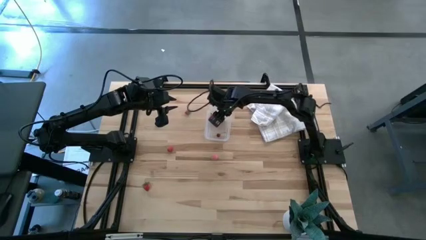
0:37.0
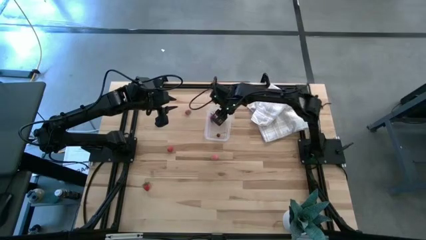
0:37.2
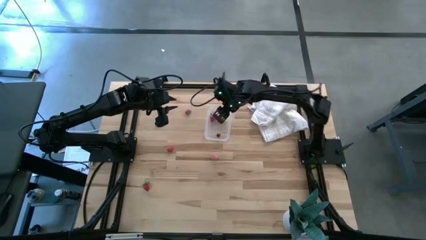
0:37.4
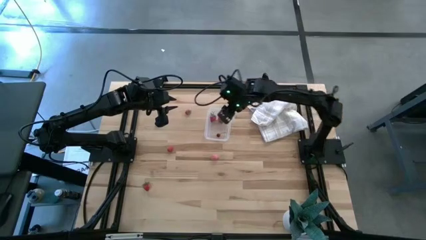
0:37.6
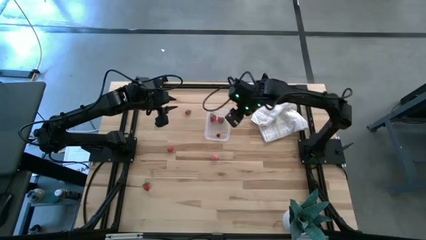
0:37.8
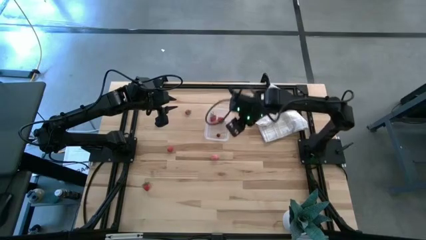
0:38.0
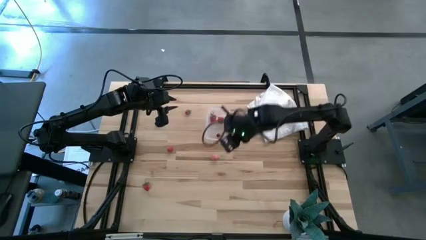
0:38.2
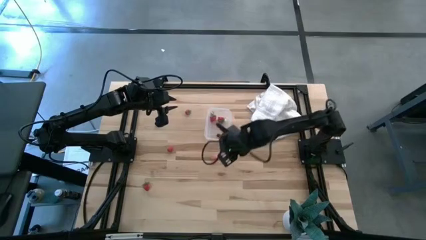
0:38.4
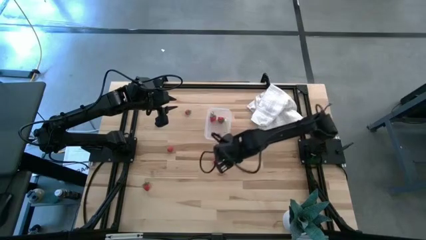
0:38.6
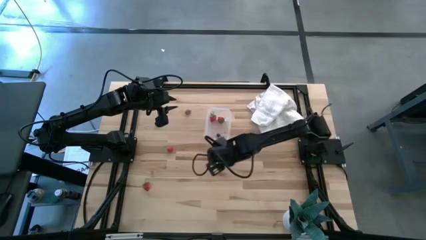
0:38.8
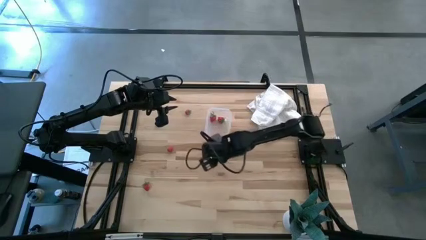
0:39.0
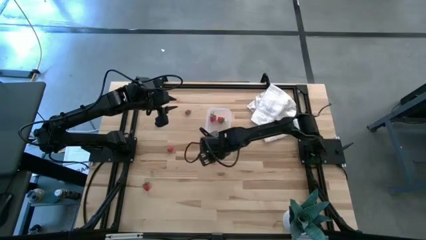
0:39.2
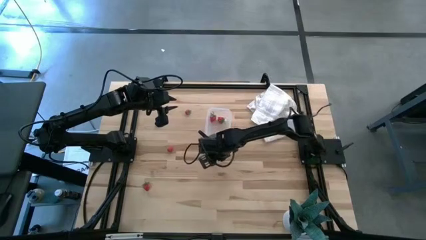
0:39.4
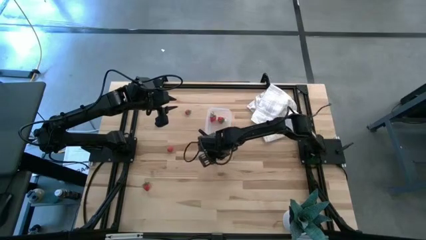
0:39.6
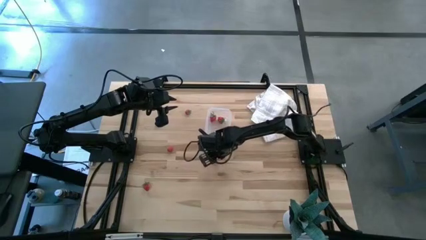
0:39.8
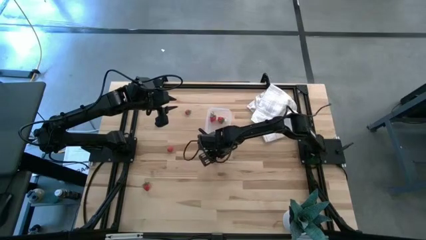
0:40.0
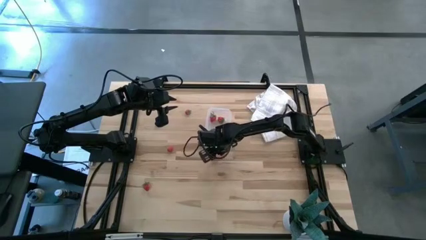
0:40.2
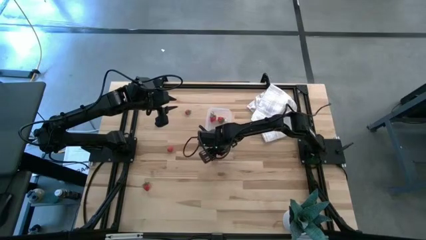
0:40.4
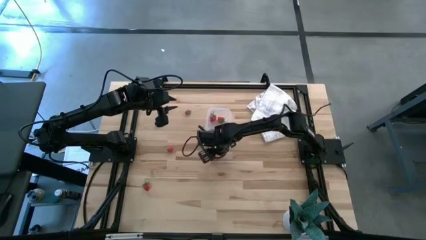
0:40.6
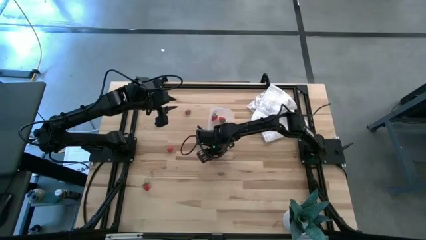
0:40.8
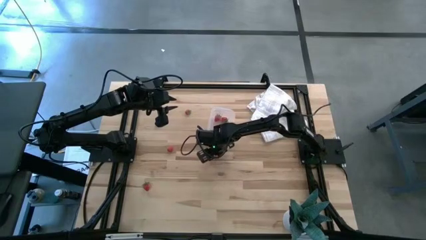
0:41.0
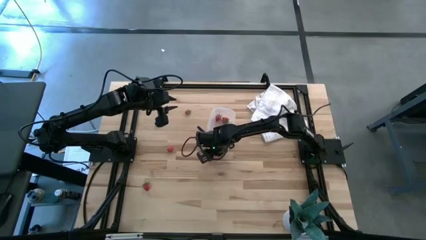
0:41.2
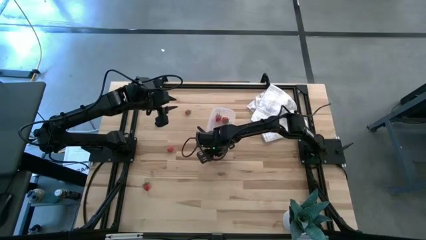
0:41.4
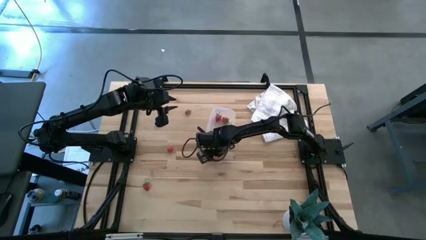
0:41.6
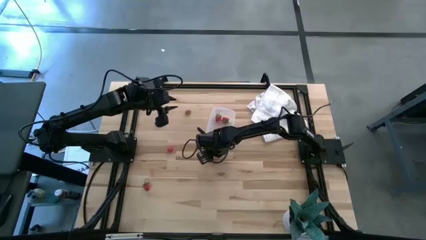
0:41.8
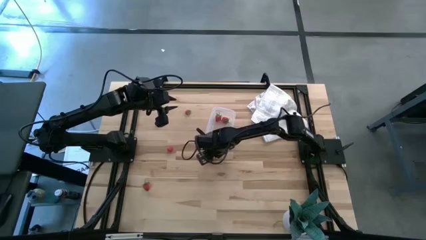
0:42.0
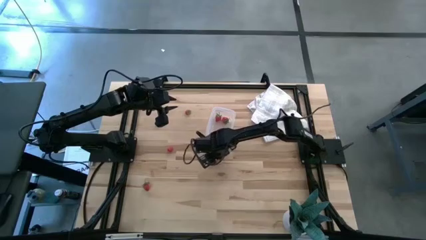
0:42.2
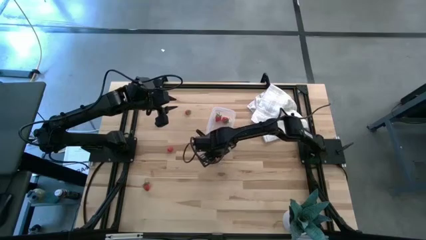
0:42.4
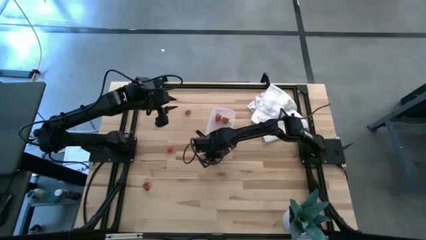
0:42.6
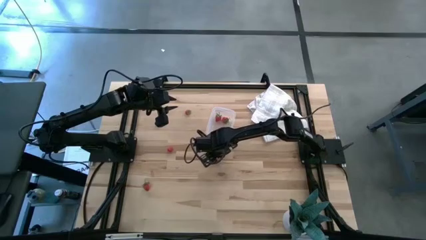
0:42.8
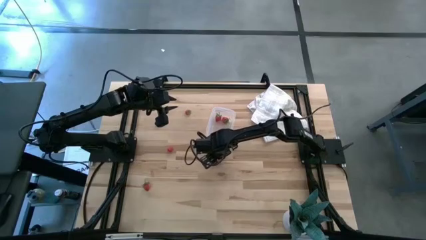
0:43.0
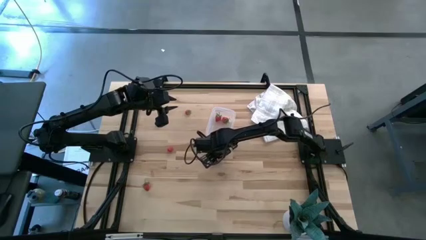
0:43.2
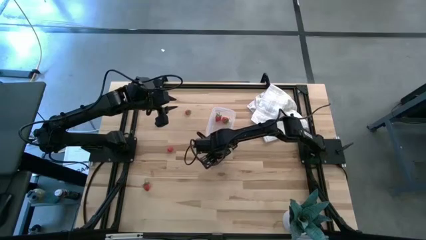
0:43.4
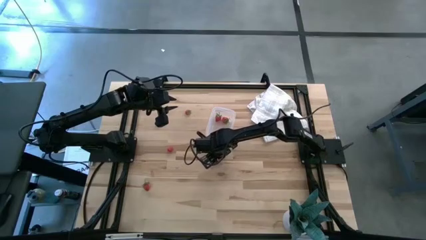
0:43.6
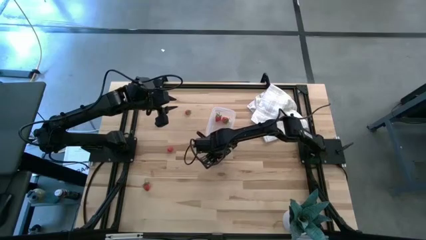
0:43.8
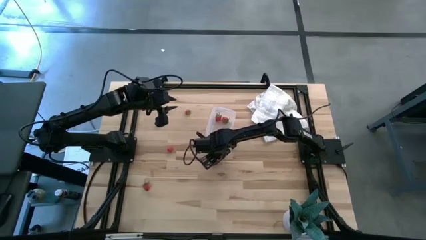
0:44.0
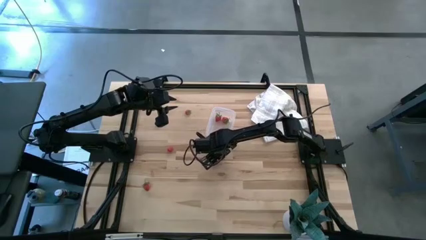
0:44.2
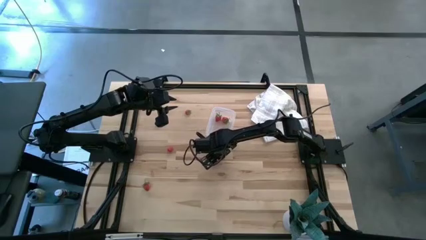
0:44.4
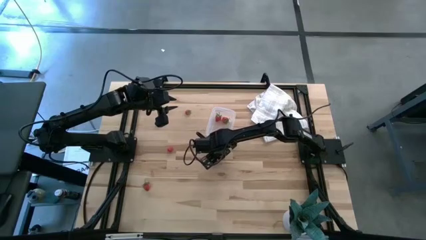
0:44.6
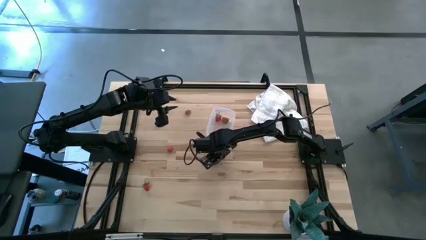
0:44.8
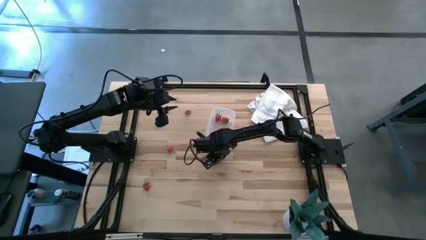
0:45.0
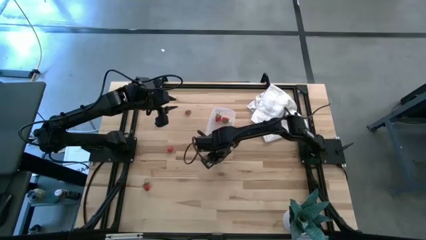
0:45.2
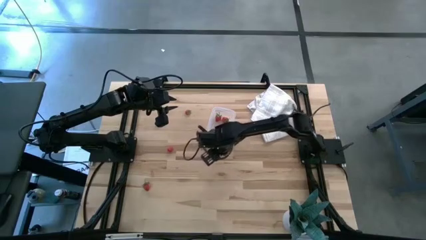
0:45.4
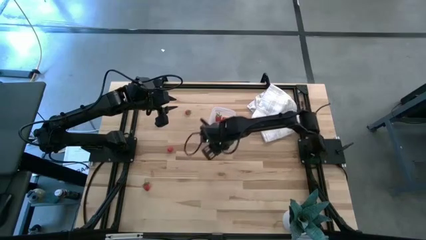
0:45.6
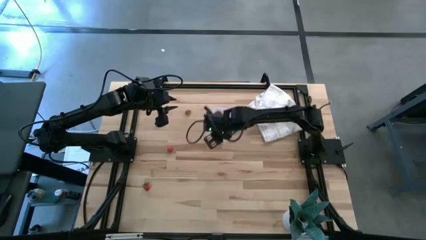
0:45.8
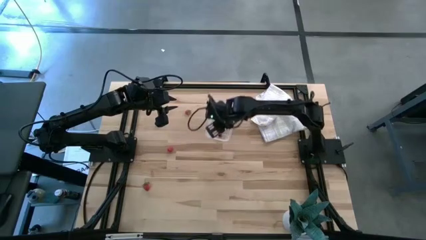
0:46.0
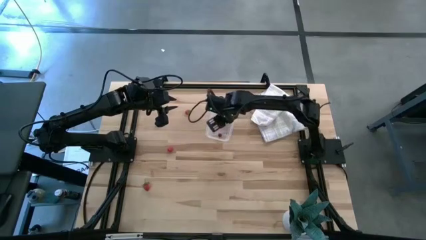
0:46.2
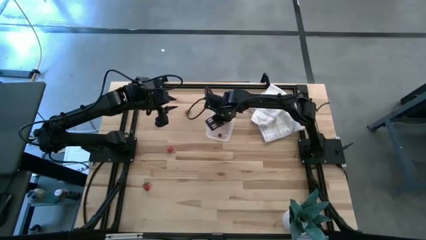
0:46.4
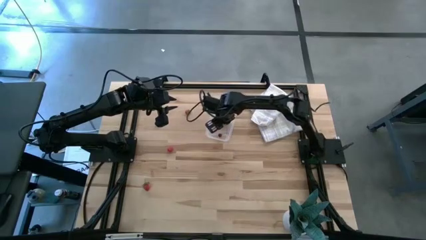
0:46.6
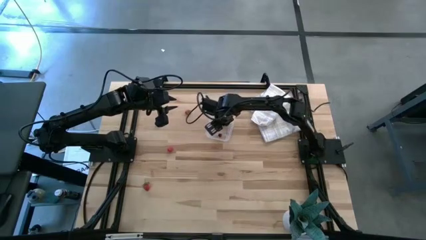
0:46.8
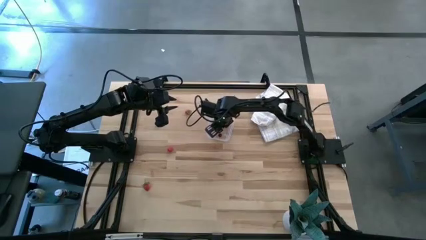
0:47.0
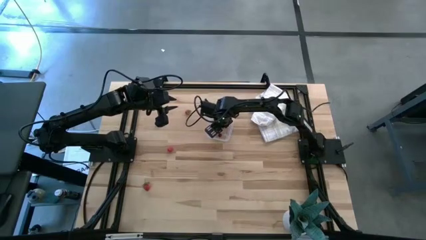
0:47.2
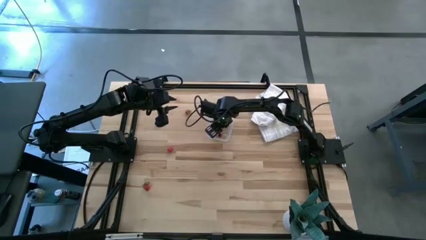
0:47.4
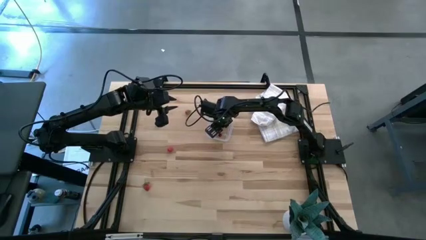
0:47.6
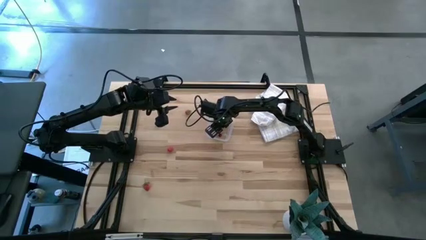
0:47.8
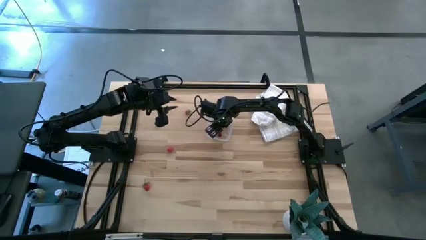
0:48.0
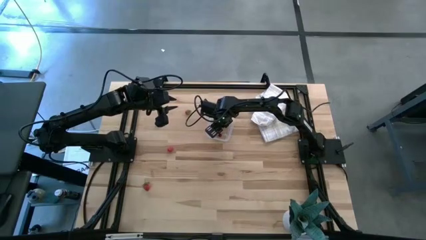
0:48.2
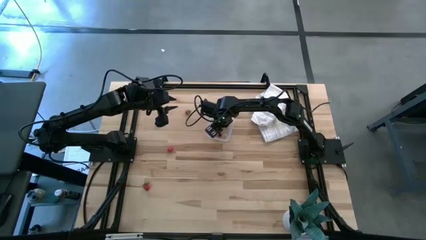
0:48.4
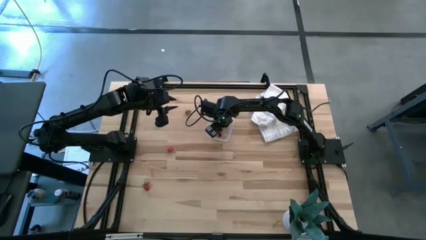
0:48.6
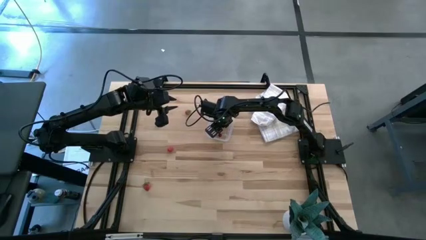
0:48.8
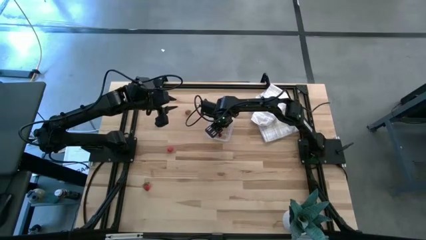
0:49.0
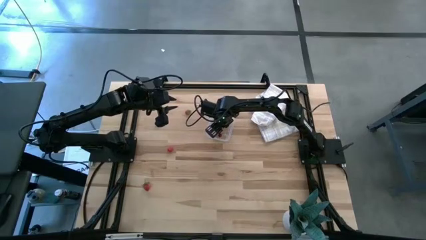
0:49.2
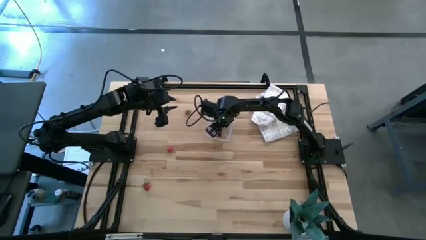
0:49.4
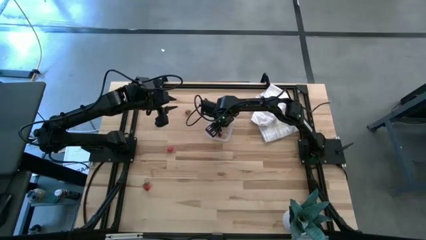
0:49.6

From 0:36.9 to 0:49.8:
Task: Pick and placing Produce into tupperware
Put the peach into the transparent container
